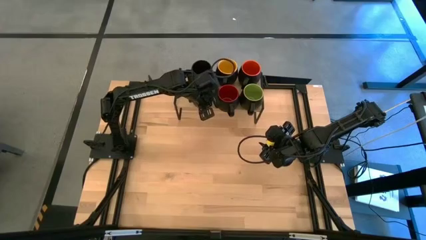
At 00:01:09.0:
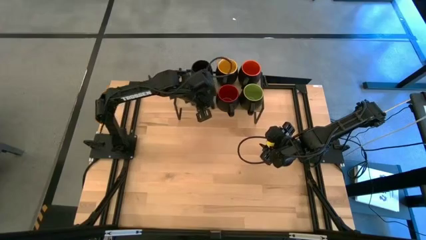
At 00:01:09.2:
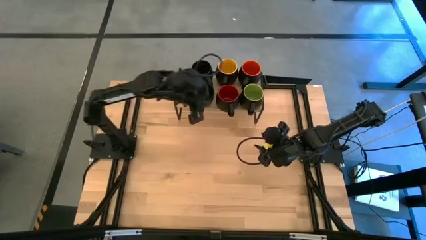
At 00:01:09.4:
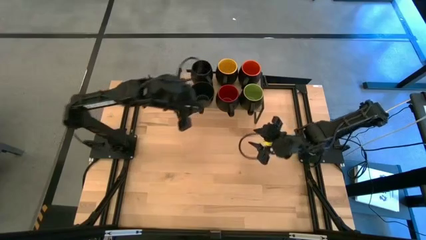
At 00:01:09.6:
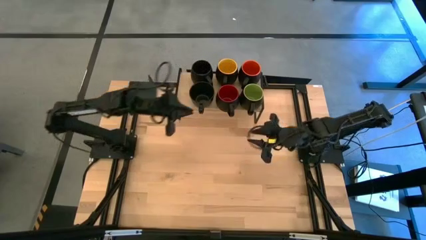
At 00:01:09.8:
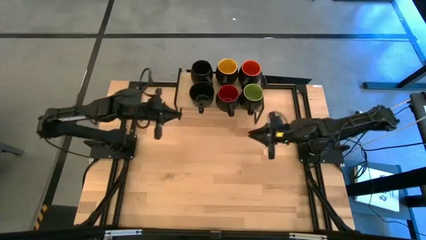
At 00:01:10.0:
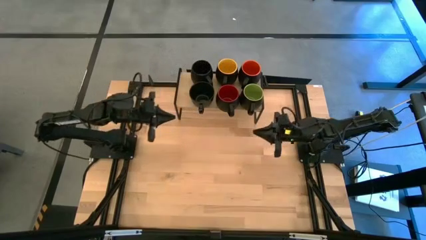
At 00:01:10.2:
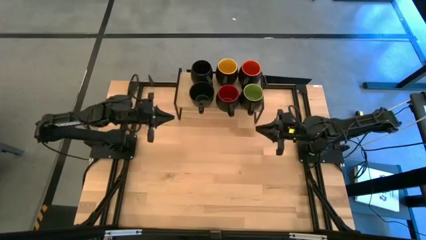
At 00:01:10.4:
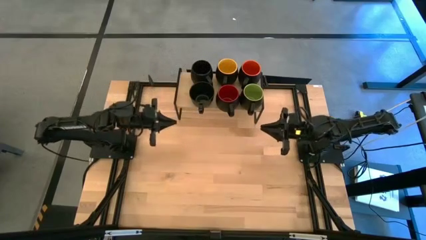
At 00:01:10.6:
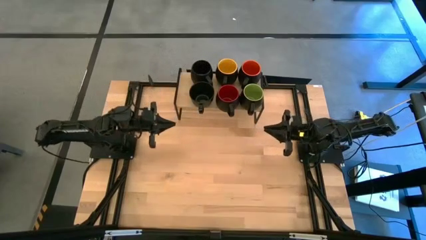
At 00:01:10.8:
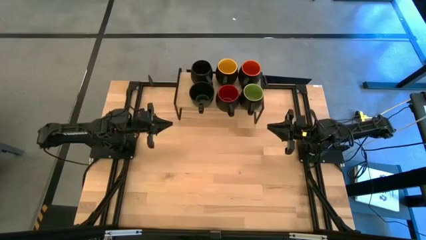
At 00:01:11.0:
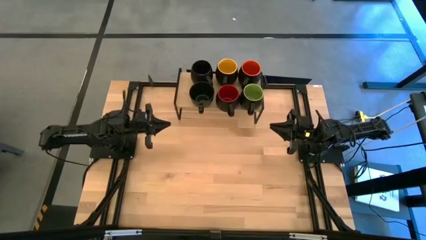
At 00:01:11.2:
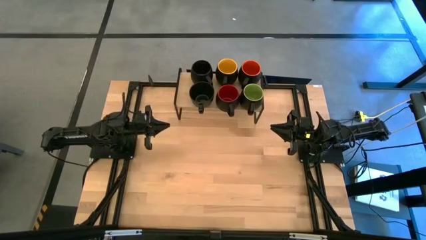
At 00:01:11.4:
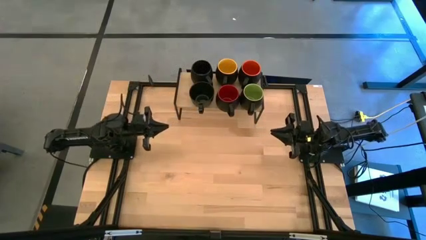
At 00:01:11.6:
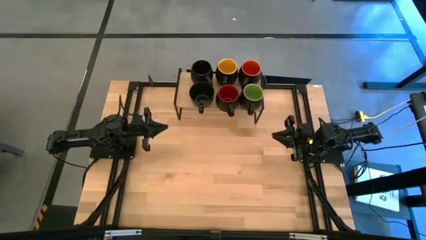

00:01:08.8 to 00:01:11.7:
Task: Place coffee mugs
Return to Home Position

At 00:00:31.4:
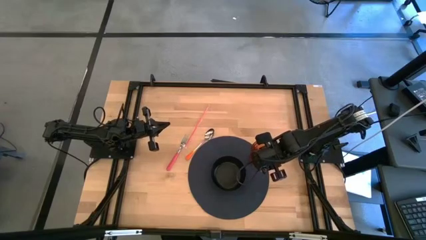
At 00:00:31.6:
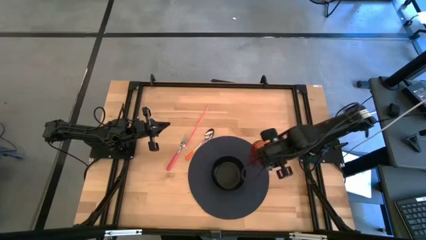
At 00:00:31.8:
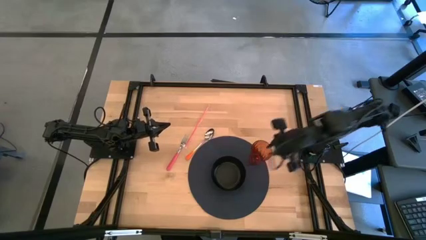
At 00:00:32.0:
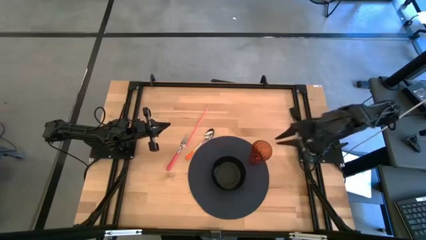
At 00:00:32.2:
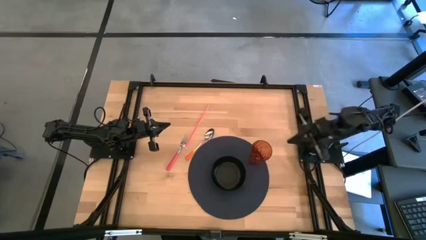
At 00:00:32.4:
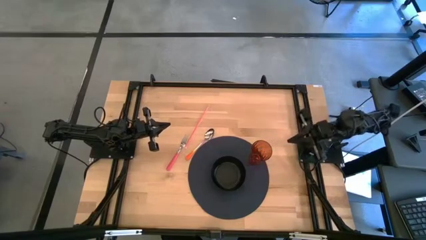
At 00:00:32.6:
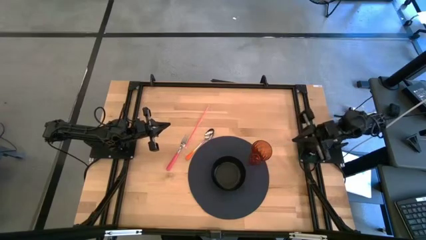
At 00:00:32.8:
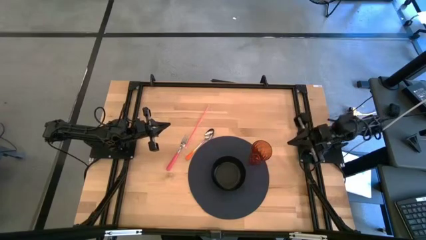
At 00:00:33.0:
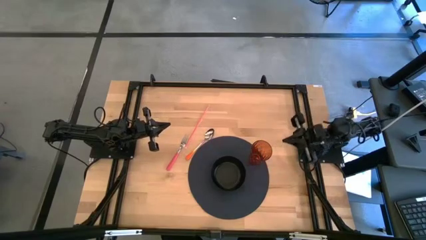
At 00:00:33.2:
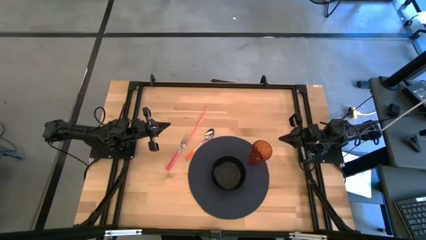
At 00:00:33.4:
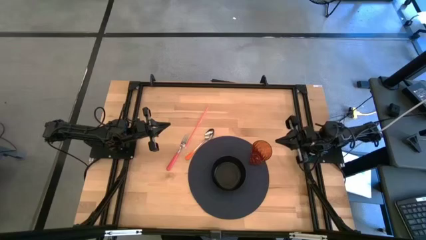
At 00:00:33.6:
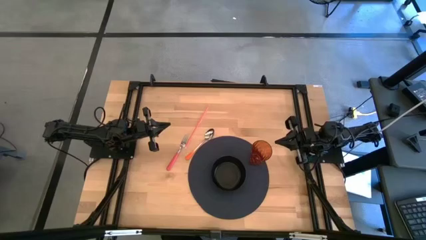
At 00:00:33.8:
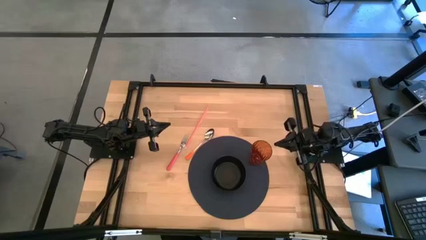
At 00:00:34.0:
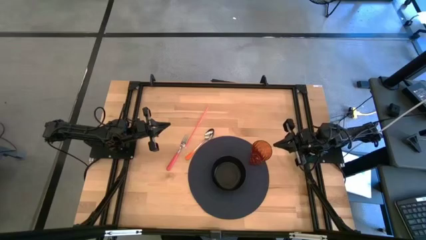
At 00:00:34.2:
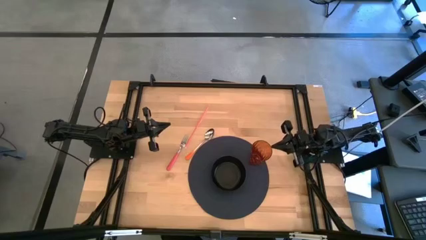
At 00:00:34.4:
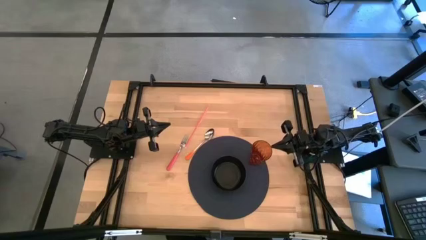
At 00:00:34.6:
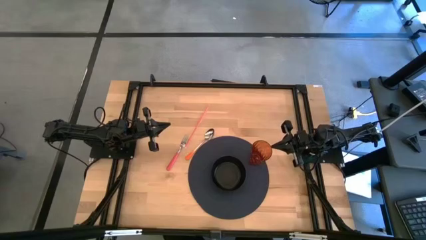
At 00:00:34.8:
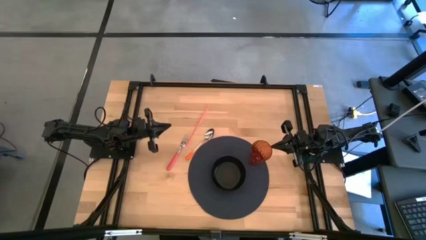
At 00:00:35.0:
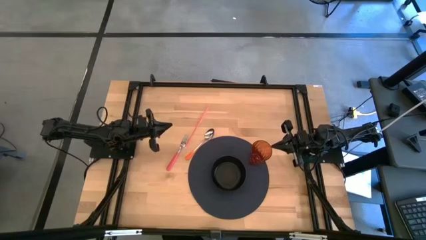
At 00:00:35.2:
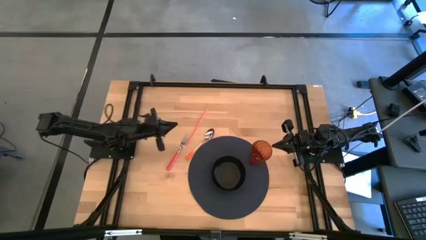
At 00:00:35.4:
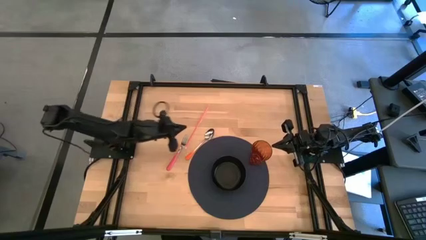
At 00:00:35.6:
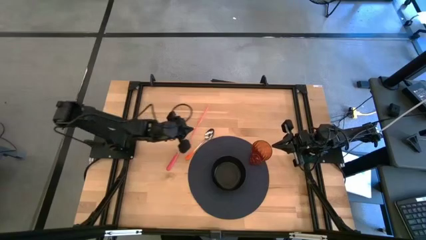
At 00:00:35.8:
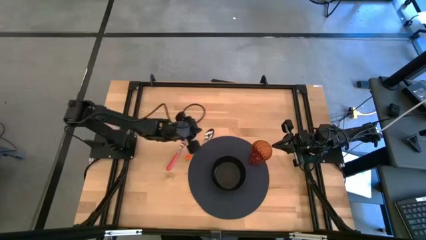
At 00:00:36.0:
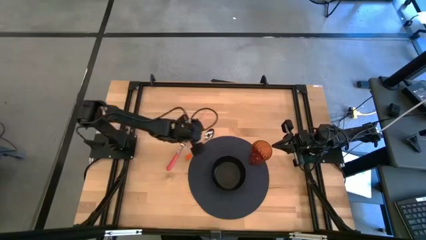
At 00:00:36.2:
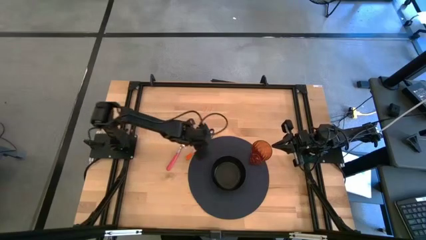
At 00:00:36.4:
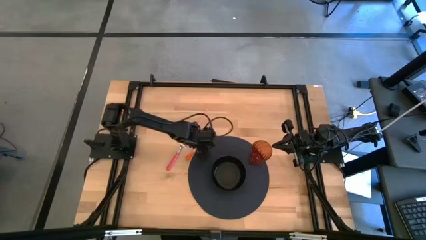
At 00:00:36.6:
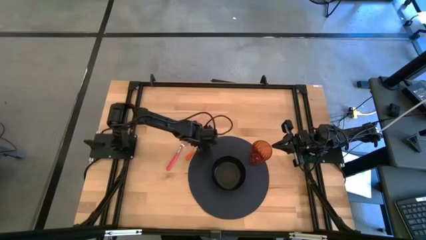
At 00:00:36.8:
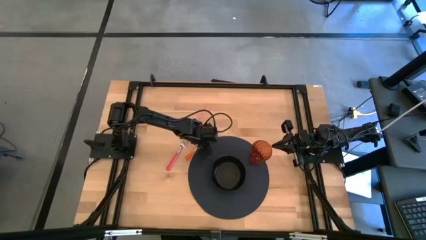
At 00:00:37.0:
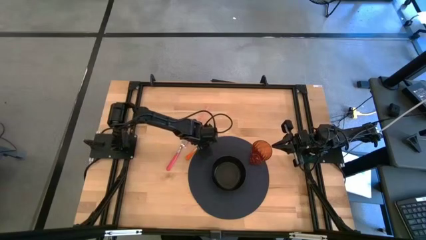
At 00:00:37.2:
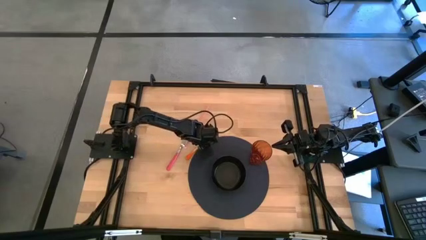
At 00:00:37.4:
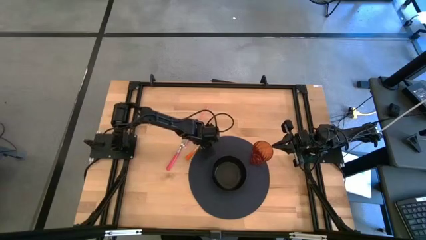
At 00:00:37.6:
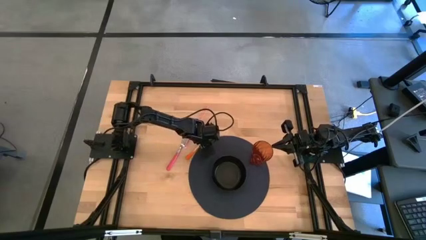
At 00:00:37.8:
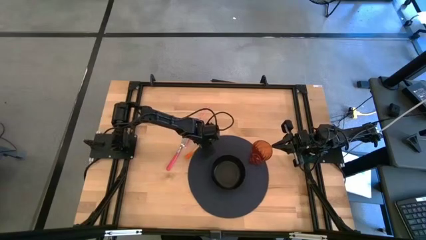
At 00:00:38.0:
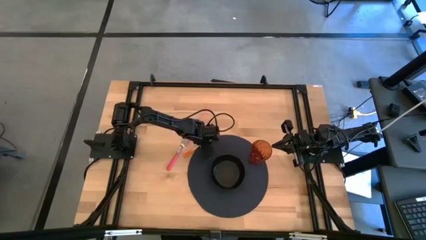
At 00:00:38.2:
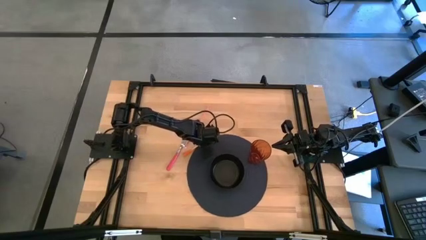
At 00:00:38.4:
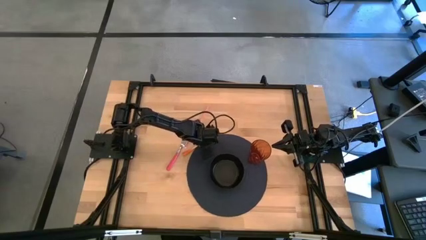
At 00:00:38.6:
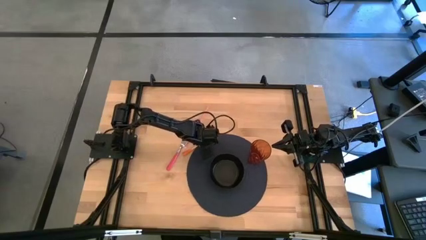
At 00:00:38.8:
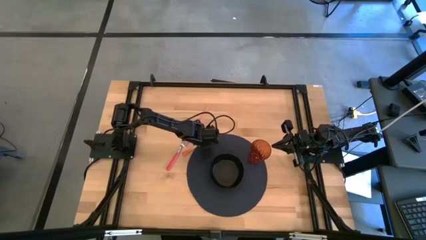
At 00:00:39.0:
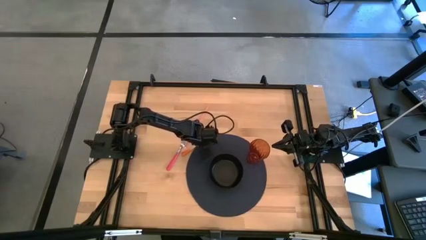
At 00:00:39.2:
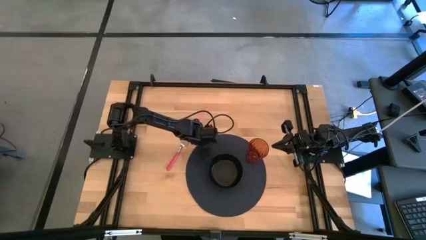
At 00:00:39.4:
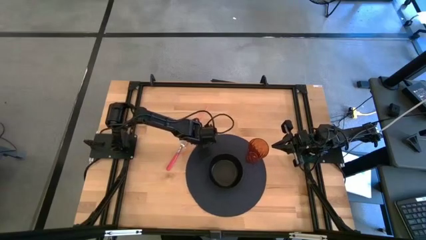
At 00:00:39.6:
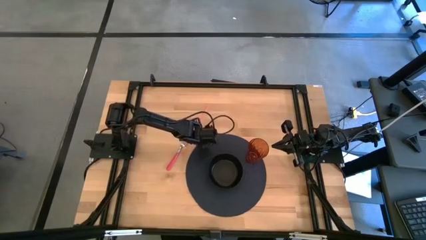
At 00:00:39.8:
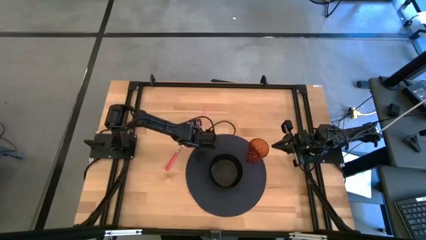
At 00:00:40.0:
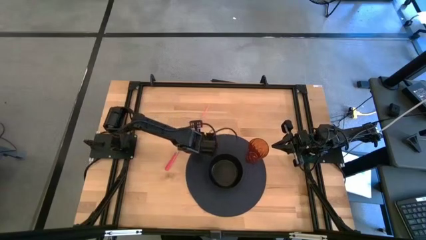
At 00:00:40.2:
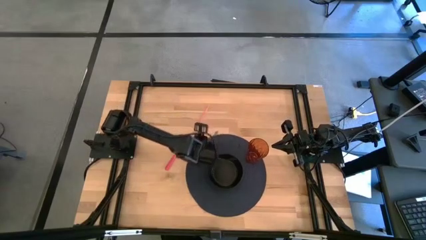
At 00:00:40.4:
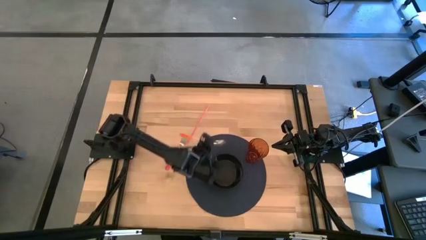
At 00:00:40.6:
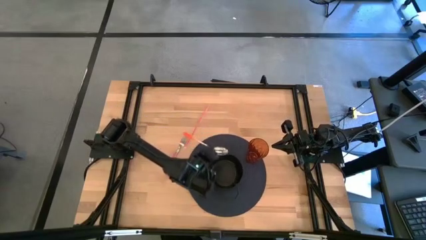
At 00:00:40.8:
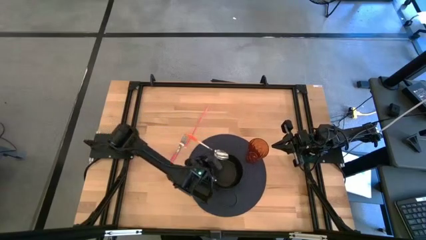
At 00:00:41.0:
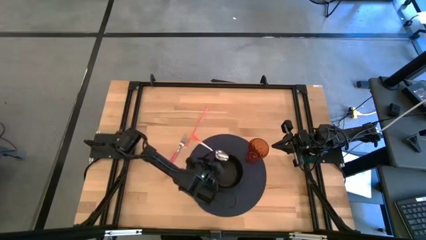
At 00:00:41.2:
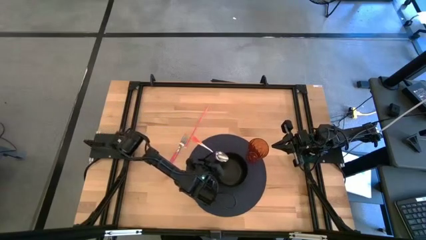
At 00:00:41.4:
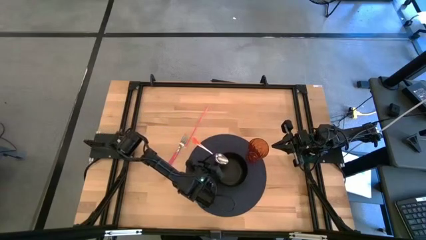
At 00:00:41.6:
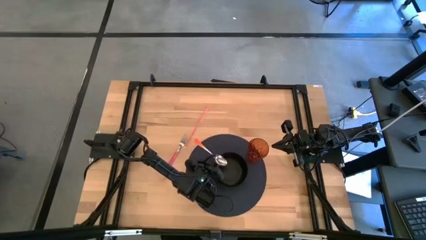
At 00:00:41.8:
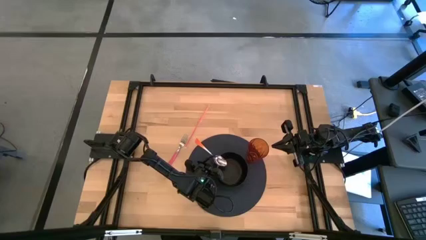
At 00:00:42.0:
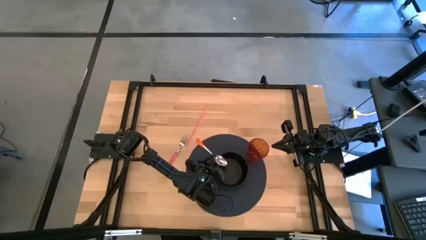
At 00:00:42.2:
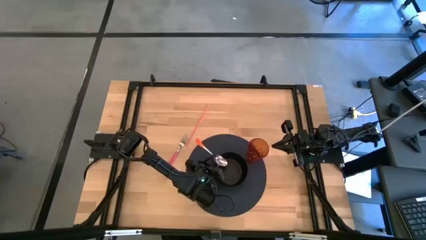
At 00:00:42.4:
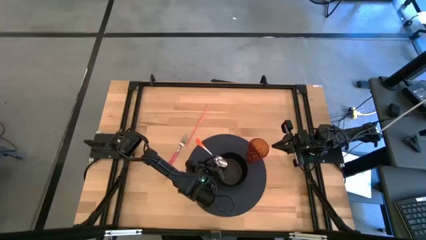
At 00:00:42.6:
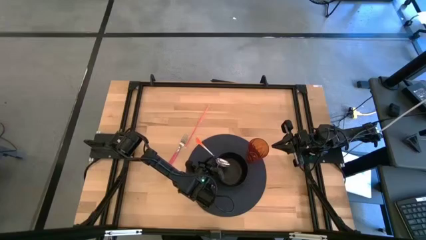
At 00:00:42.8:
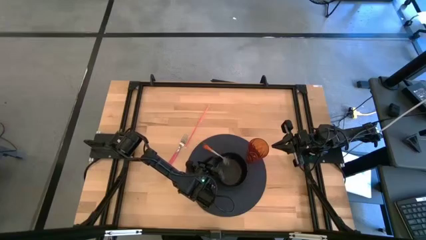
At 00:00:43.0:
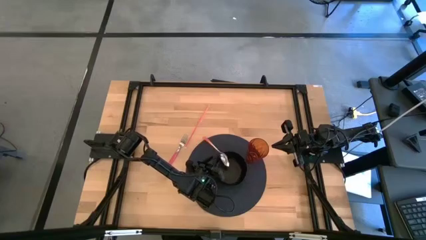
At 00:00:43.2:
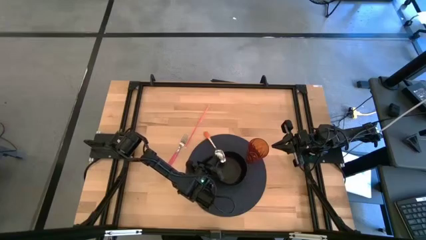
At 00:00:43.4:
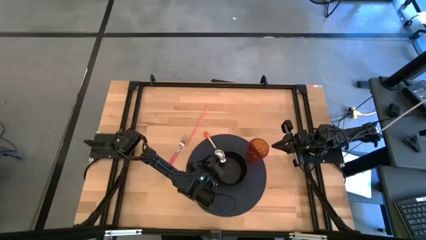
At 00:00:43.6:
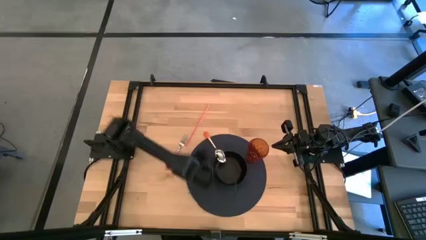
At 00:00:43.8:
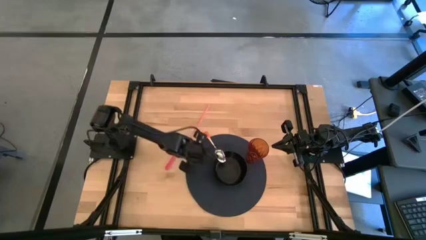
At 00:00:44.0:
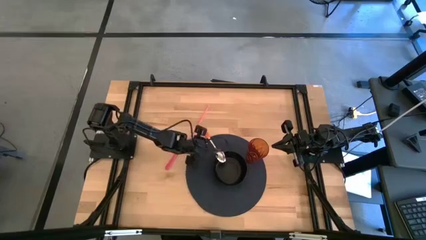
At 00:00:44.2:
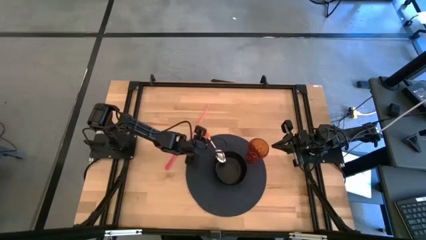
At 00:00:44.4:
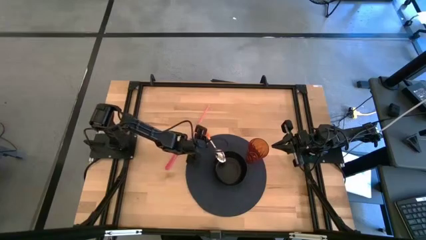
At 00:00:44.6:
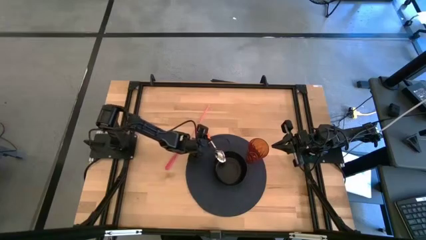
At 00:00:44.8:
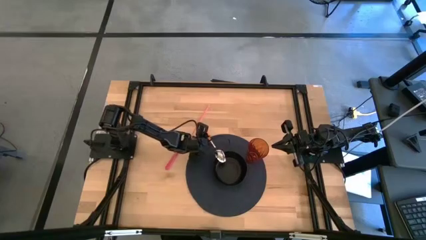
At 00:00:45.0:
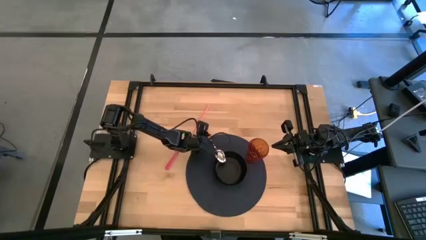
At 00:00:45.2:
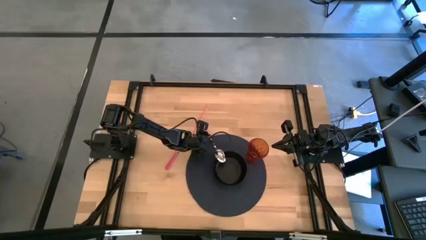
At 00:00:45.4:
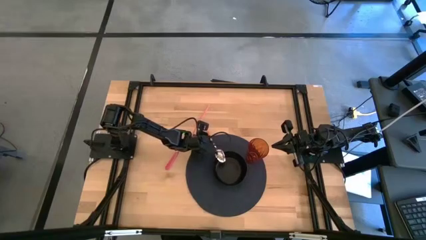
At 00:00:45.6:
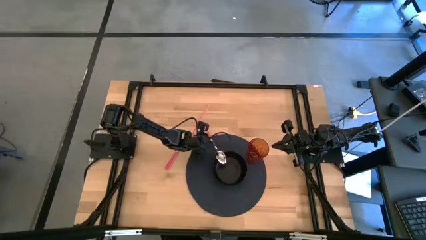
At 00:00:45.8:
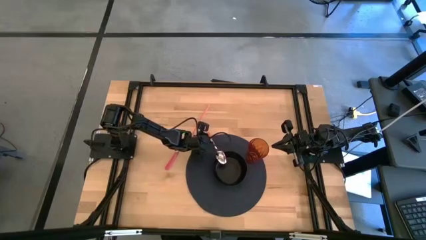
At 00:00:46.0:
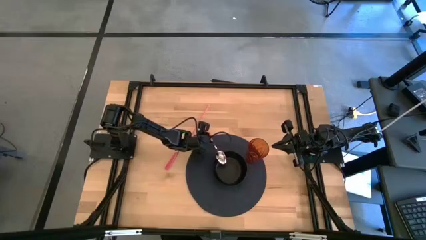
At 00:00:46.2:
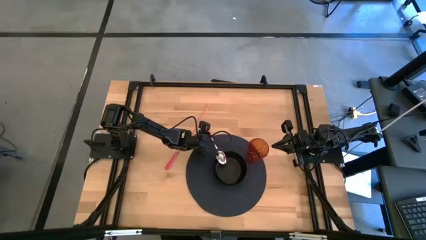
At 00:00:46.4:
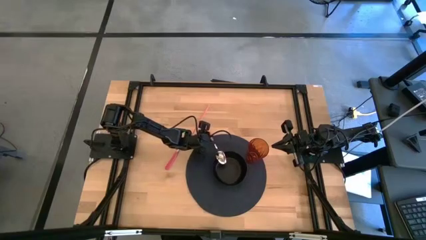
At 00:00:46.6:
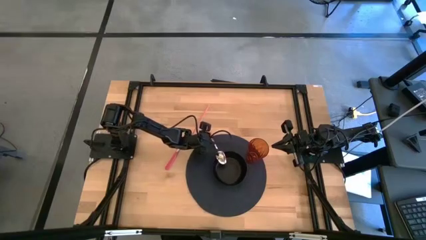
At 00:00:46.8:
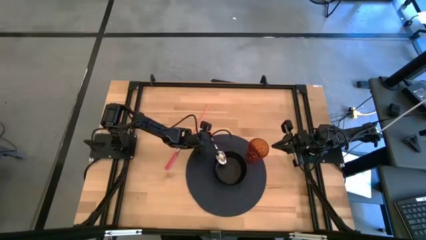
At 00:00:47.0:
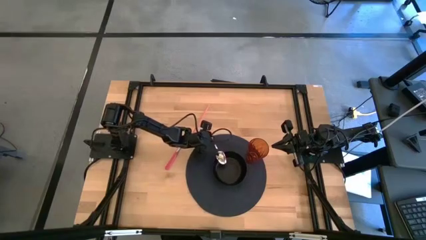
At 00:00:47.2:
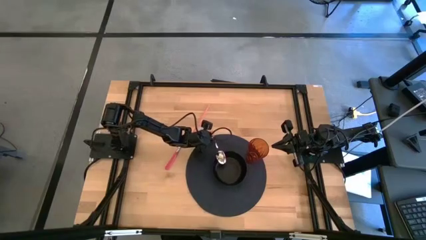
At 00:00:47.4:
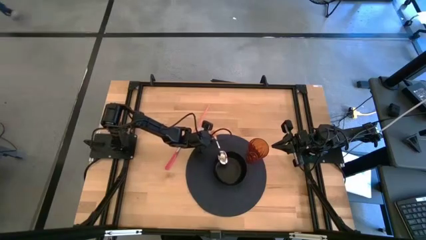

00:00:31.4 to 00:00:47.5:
Task: Pick & Place Utensil
Put the orange spoon in the black bowl
